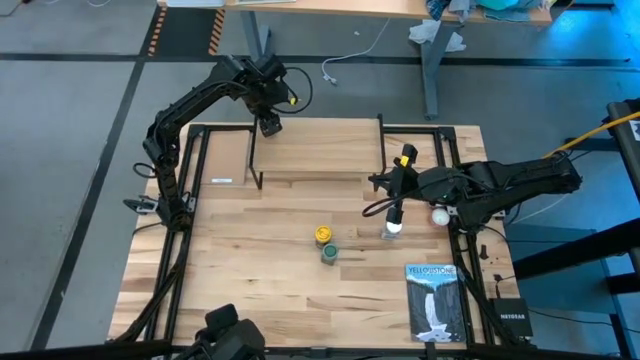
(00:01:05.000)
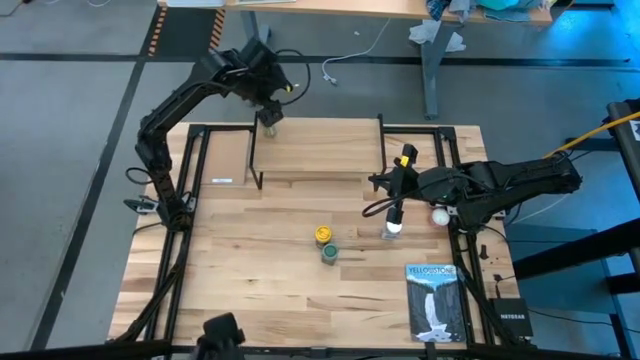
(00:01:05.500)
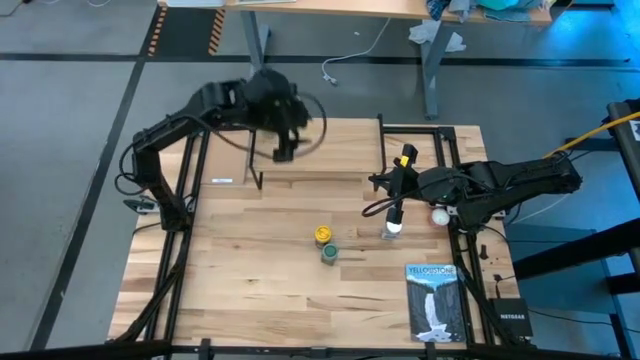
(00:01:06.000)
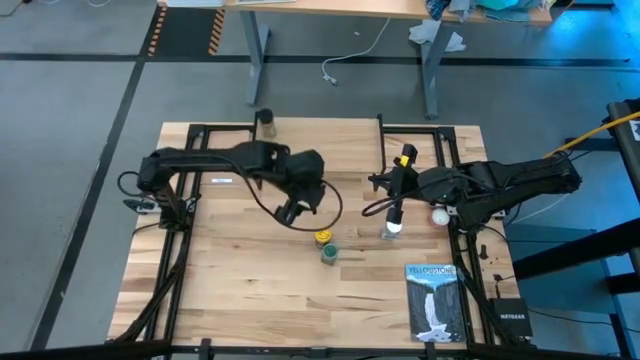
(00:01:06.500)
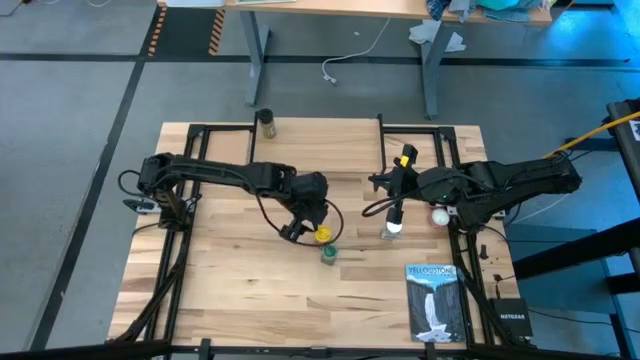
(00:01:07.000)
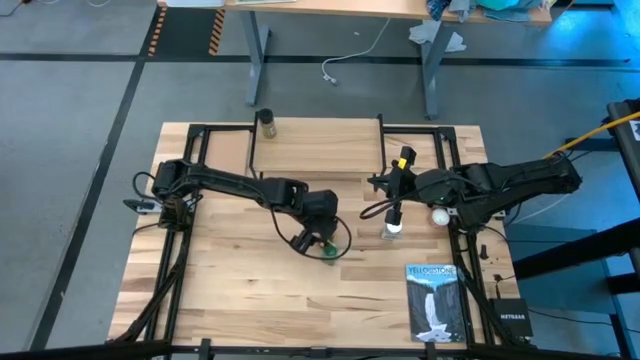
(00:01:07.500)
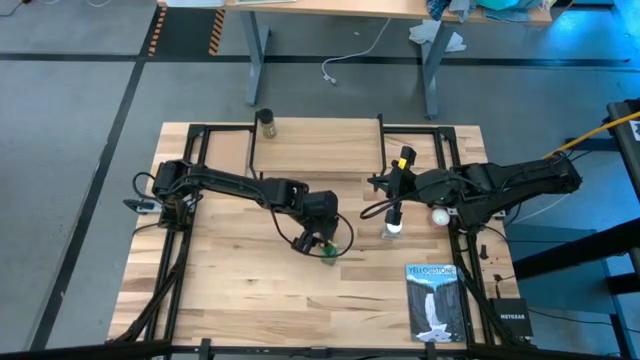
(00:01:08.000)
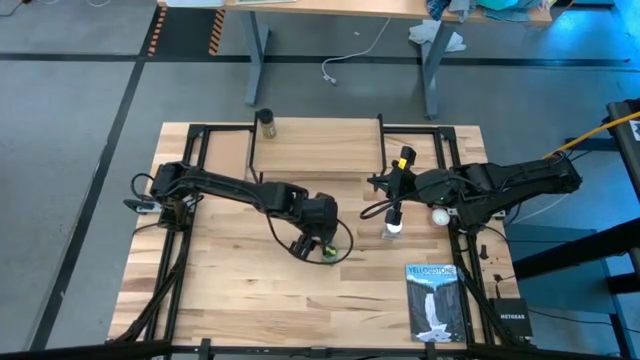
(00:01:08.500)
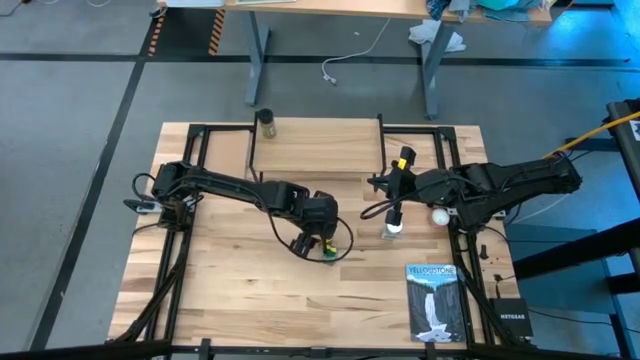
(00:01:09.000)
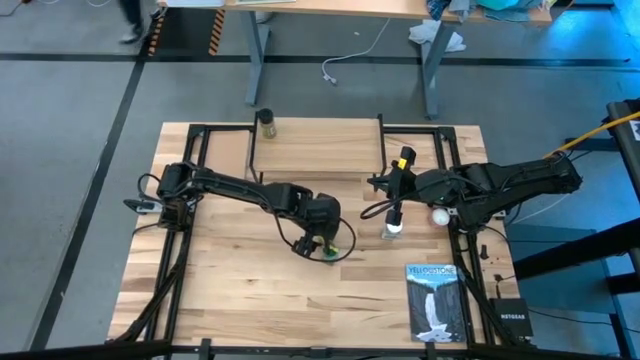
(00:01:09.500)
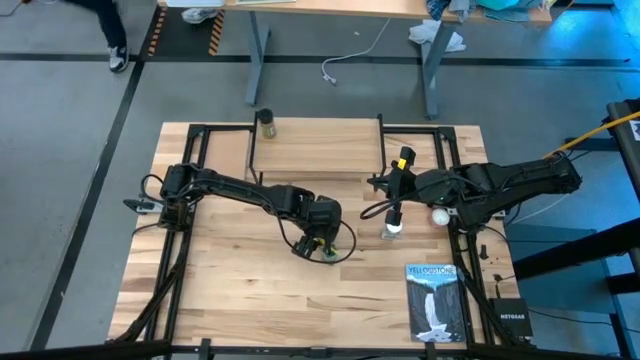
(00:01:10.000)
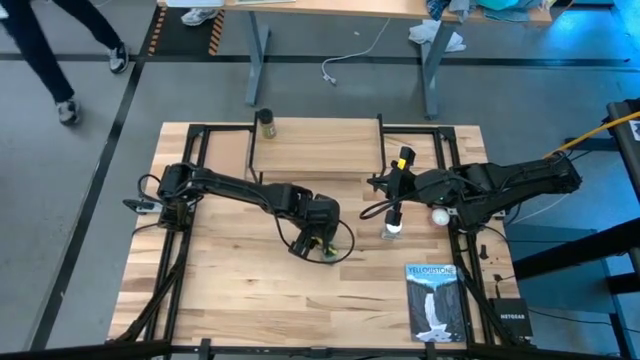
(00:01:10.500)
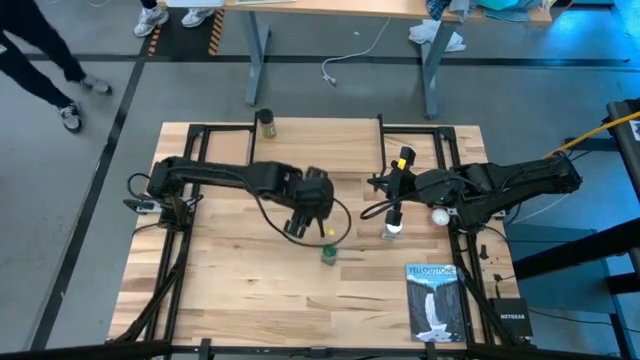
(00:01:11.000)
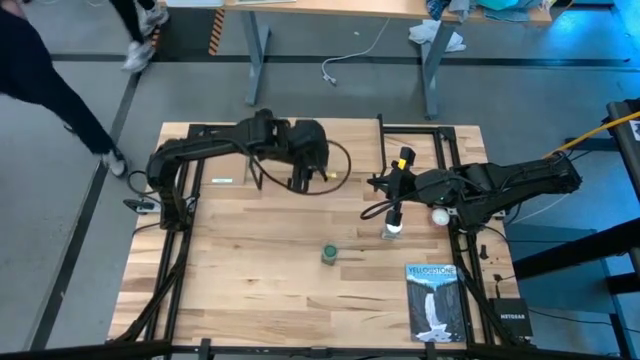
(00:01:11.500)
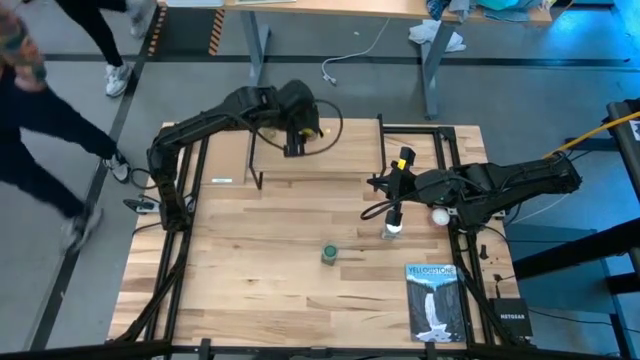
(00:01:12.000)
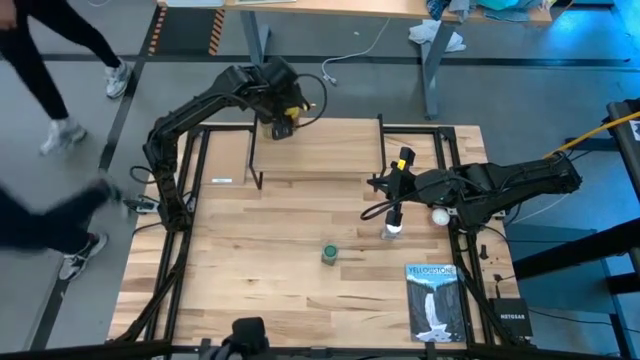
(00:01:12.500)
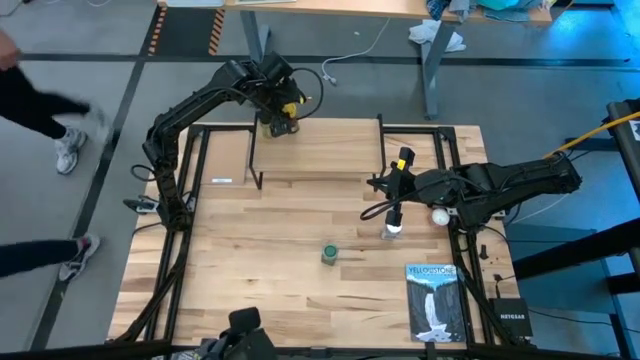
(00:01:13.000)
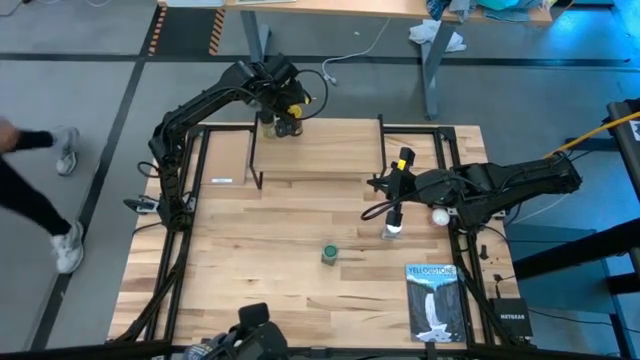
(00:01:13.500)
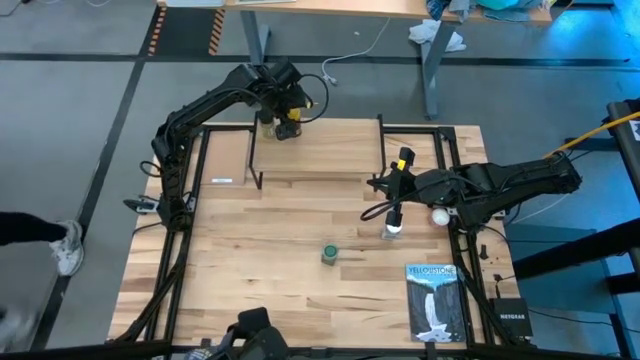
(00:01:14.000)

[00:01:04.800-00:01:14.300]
Task: Shelf spices
Put the yellow seasoning bottle on the shelf

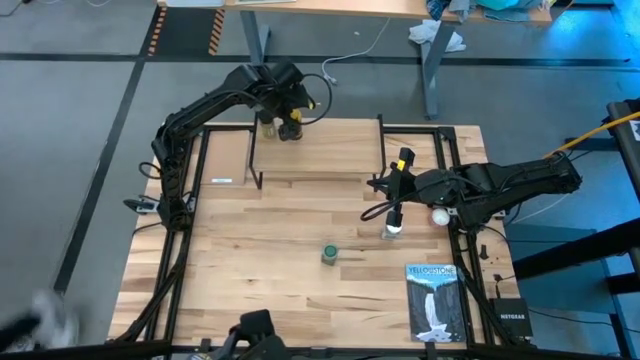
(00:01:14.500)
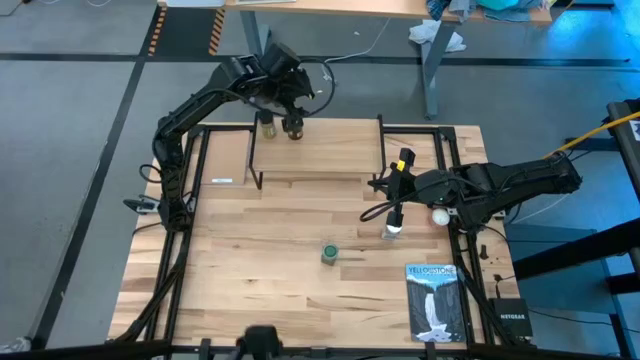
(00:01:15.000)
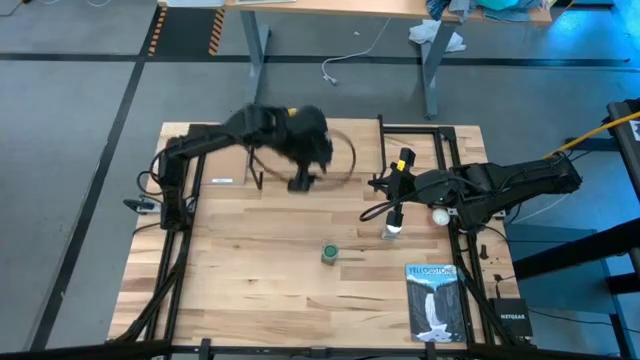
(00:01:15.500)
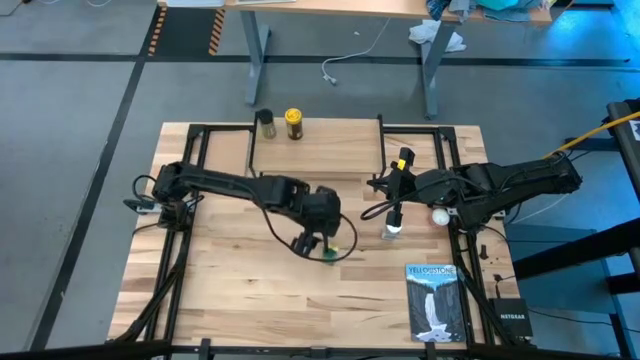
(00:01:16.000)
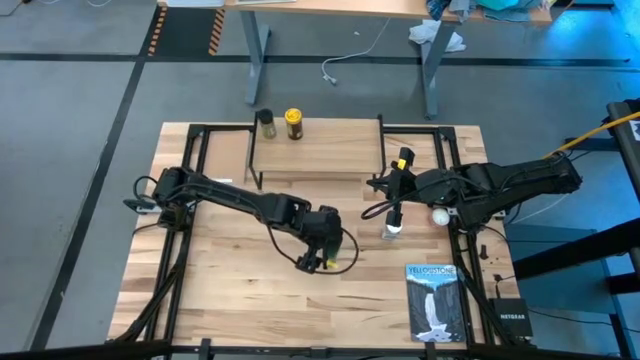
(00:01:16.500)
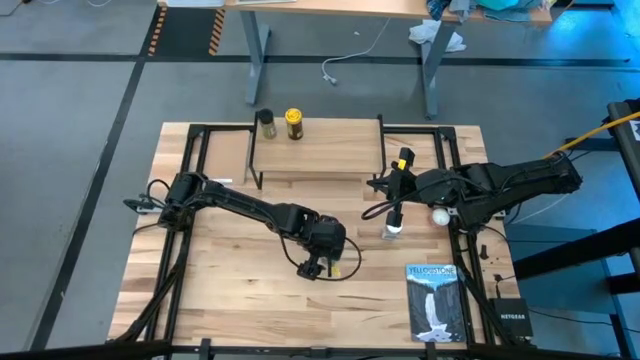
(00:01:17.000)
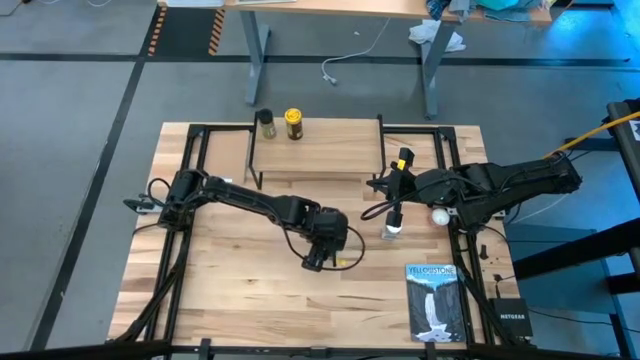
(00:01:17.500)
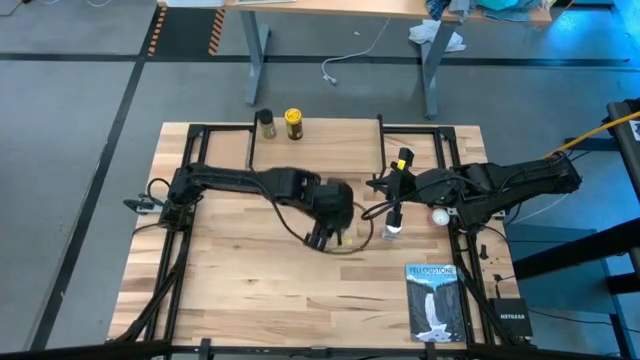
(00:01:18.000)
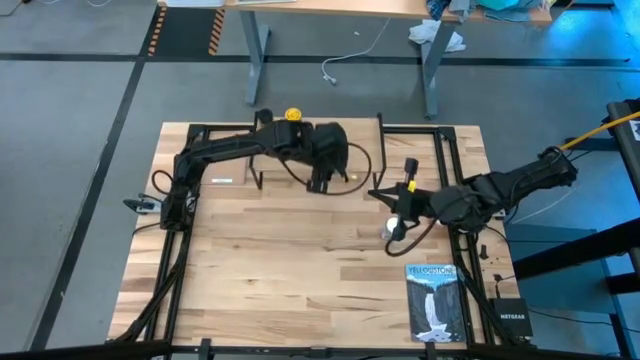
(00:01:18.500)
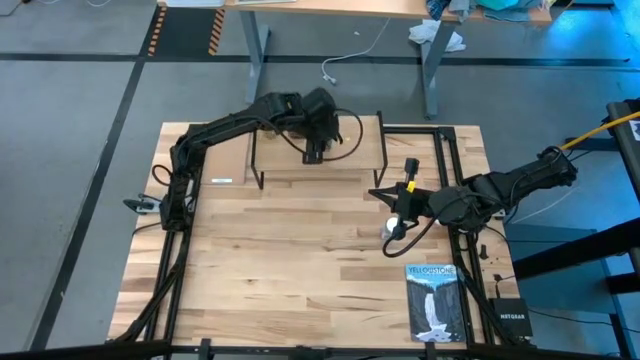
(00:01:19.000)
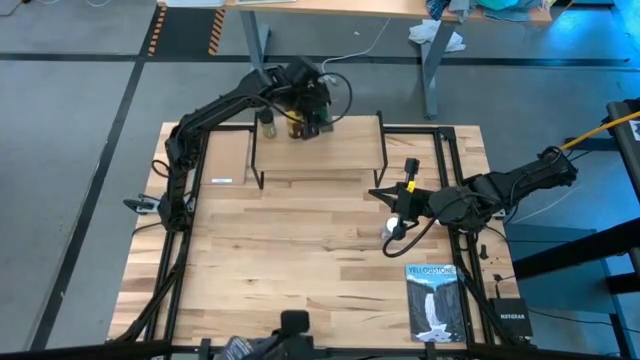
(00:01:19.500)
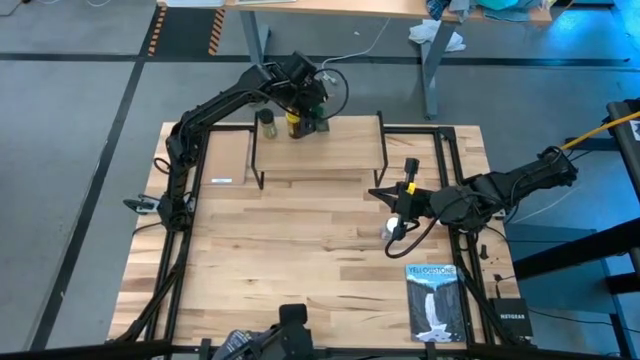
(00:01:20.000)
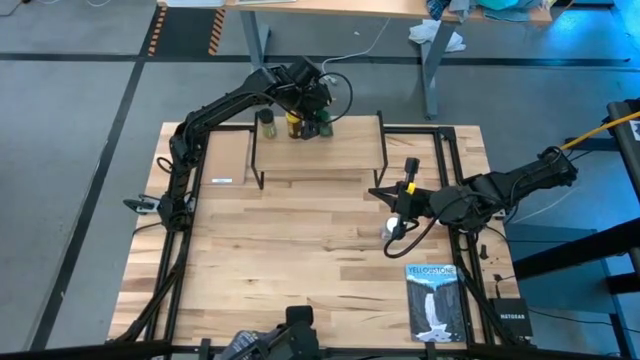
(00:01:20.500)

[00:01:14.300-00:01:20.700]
Put the green seasoning bottle on the shelf

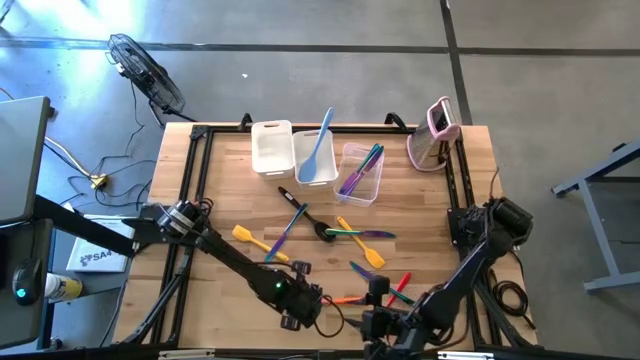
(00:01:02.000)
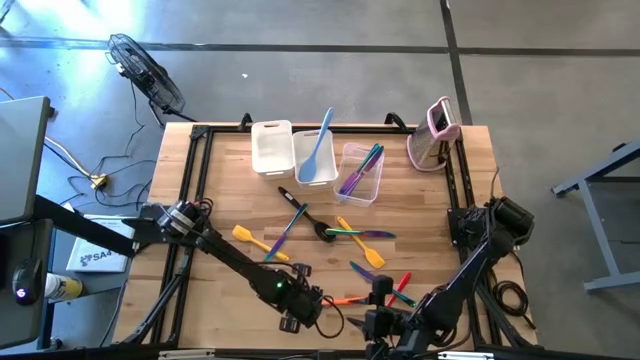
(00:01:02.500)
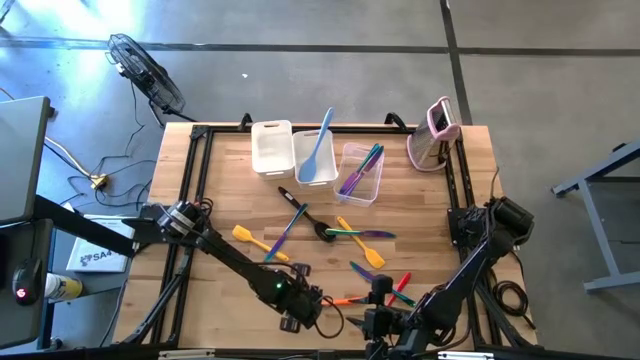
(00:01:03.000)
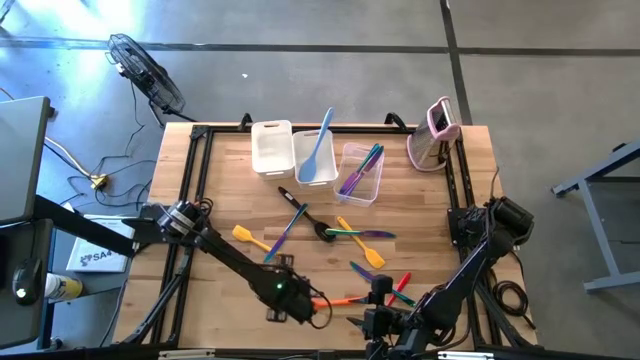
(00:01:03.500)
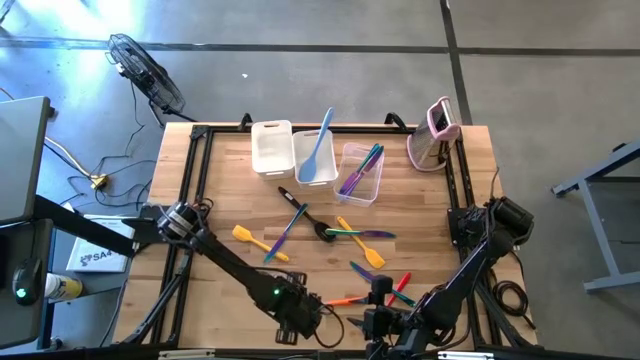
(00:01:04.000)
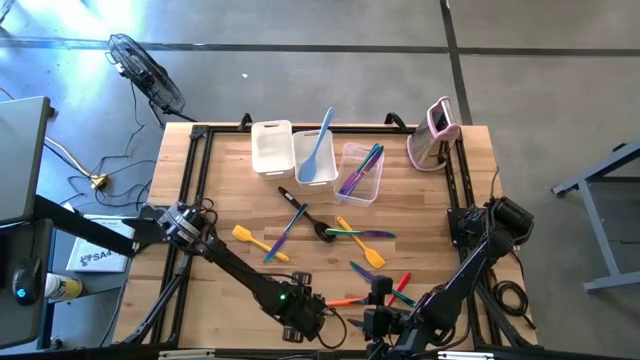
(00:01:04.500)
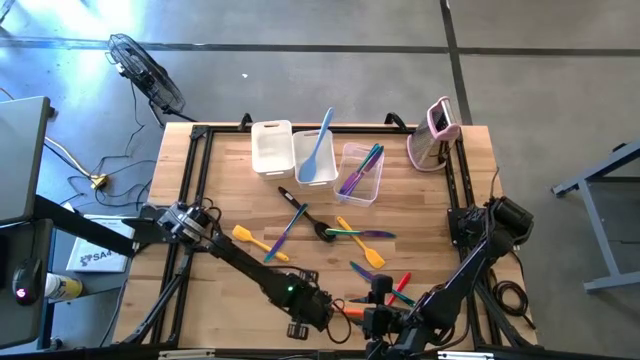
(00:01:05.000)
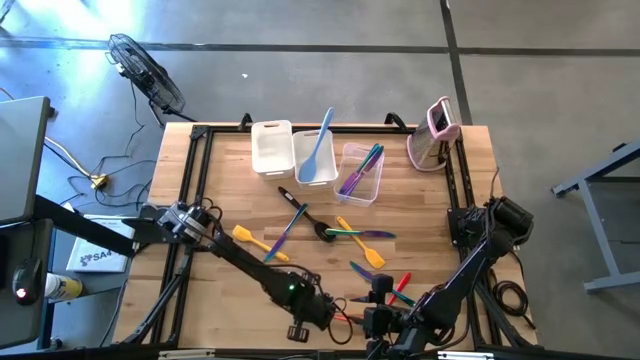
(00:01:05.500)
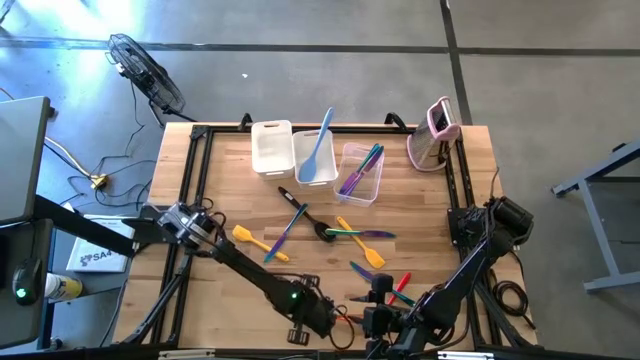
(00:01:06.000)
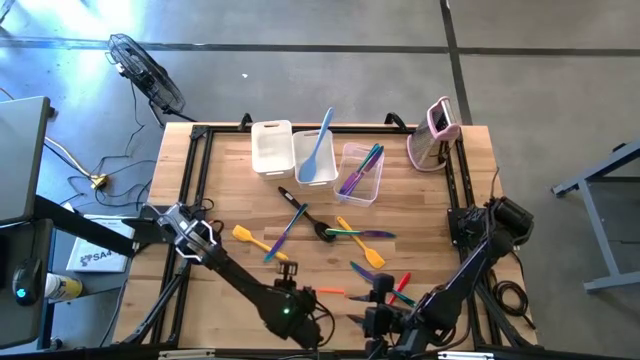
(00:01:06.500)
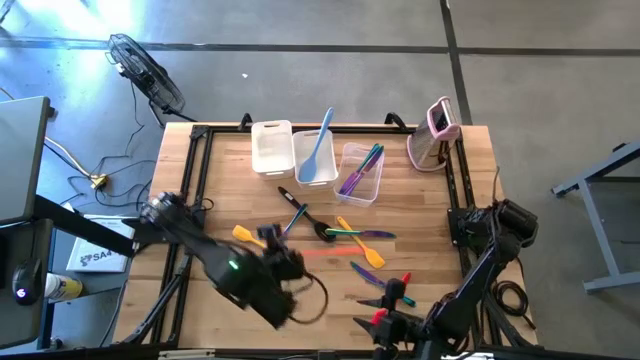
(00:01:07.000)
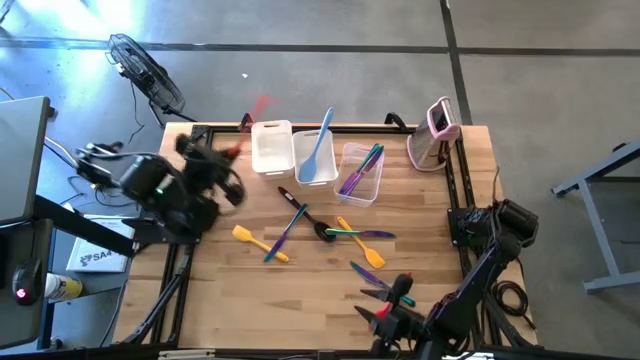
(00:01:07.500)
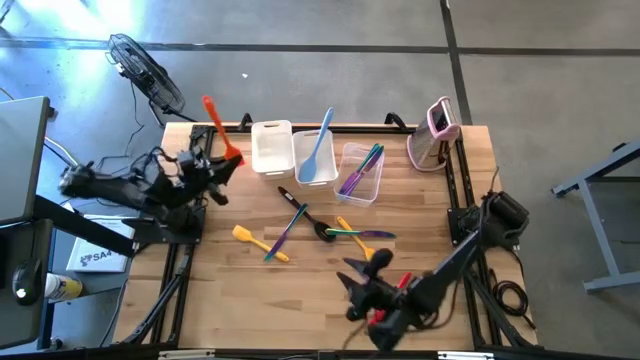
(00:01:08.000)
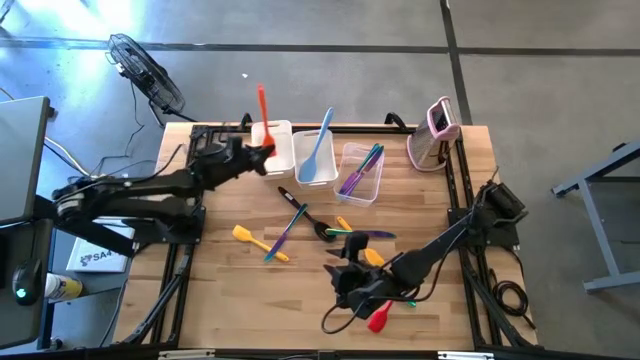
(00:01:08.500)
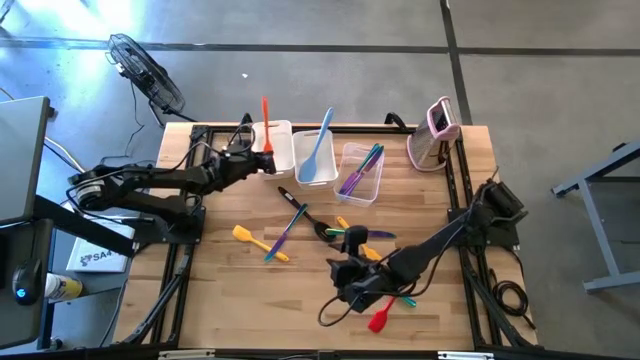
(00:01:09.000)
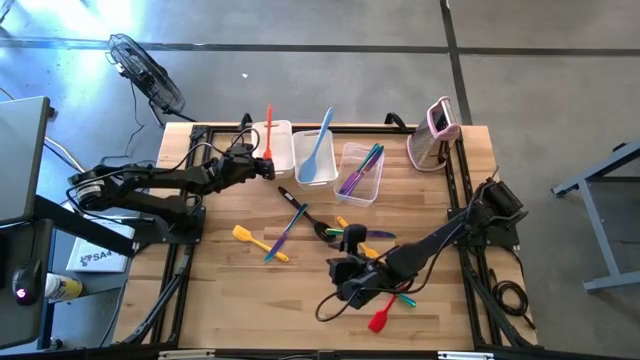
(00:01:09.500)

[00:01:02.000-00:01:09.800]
Task: Pick & Place Kitchen Items
Put the orange spatula into the left white bin
